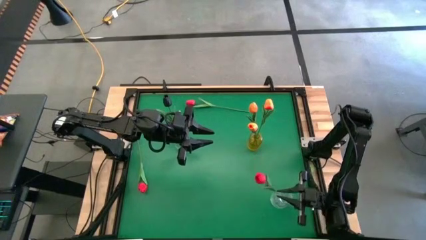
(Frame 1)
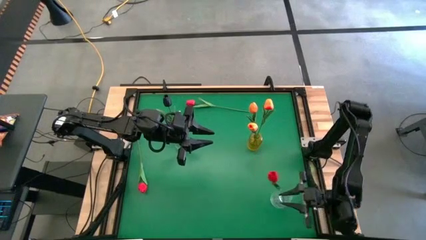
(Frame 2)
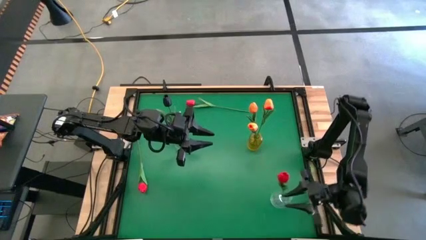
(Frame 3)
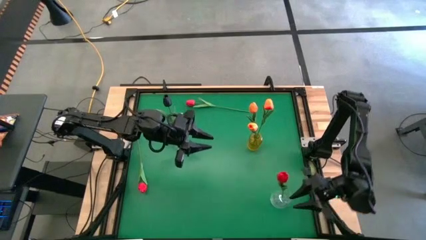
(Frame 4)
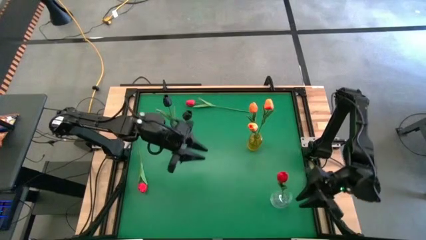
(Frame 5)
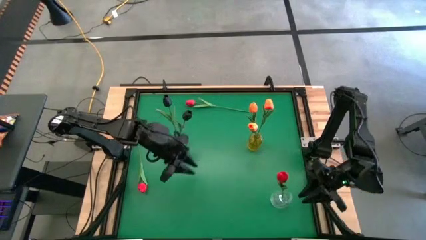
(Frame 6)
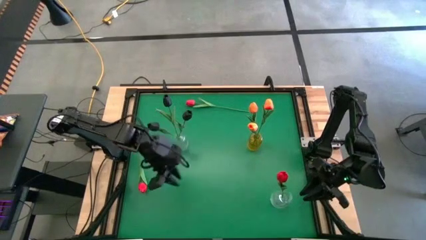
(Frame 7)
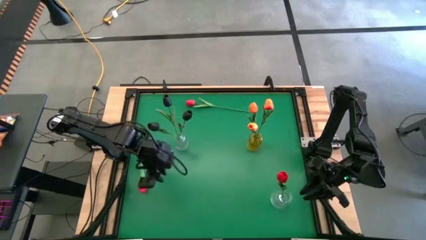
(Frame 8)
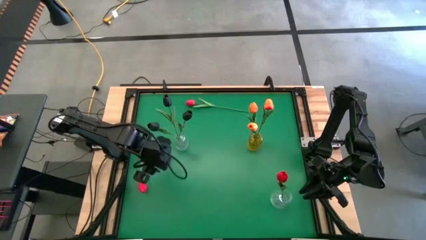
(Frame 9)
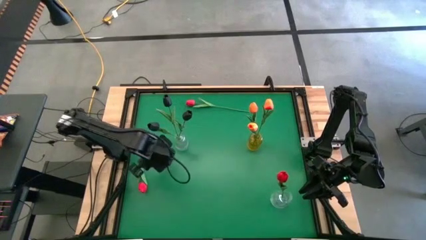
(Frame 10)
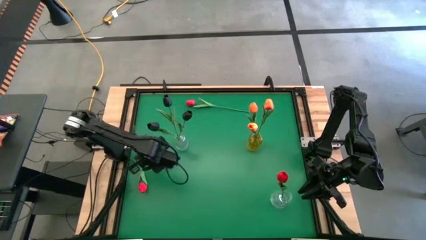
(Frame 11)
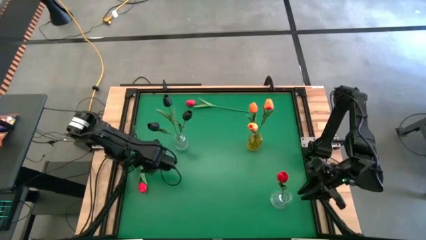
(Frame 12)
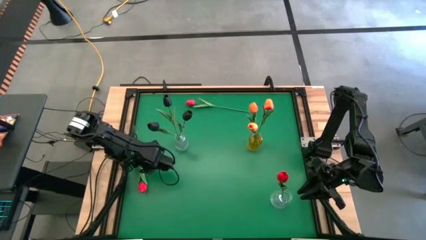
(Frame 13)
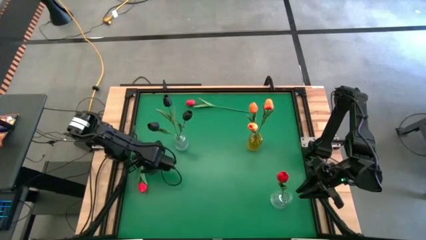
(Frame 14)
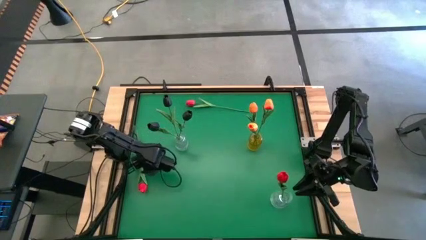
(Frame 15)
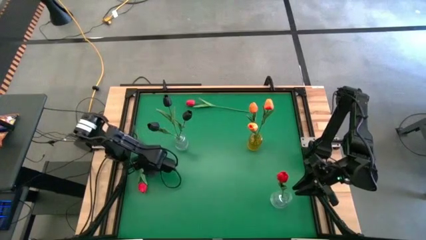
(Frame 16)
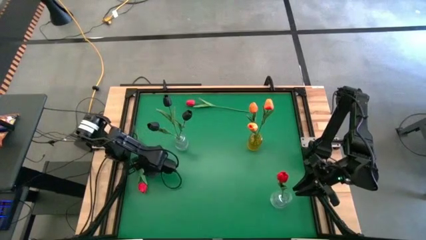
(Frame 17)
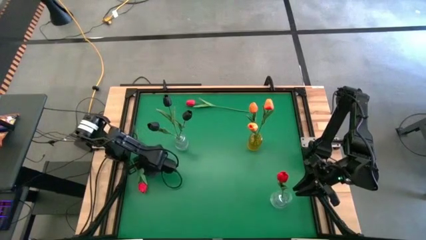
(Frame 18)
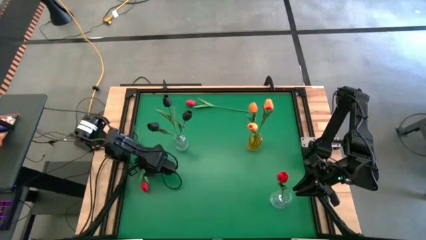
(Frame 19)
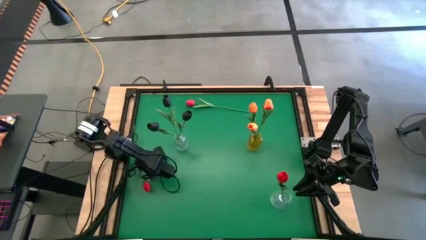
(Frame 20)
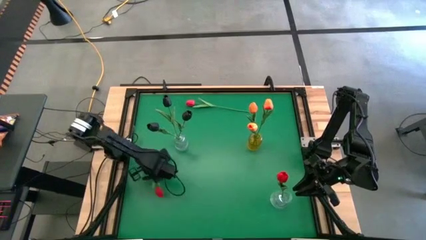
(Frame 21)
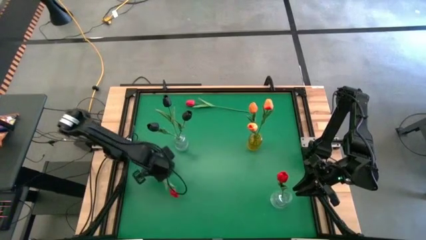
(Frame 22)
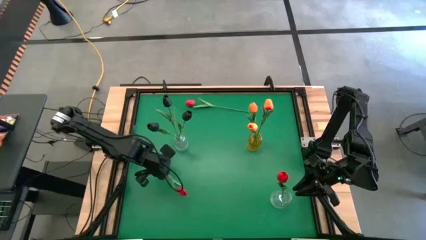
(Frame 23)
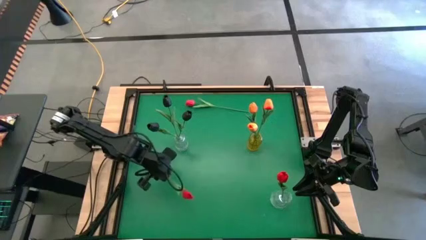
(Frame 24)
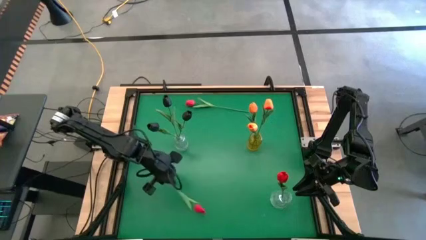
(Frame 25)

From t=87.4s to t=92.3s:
Task: Sort flowers into vase by color
Put the bottom red tulip into the bottom transparent vase

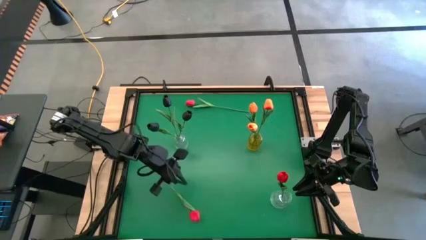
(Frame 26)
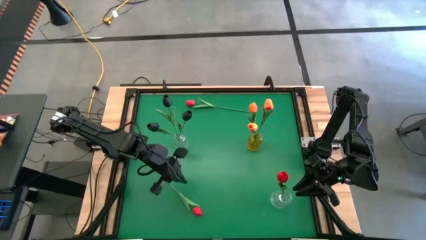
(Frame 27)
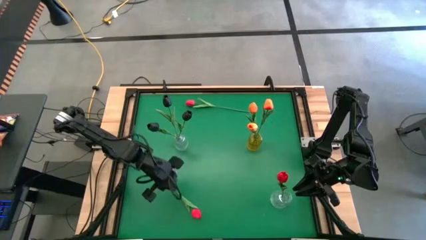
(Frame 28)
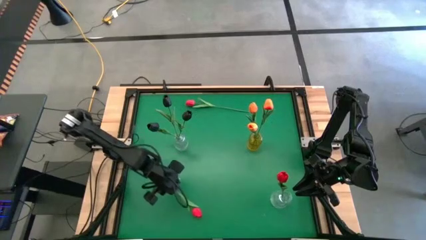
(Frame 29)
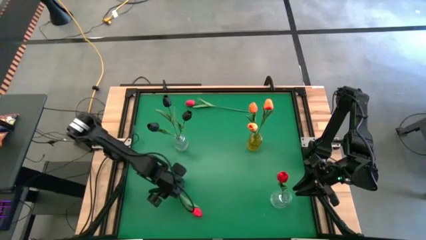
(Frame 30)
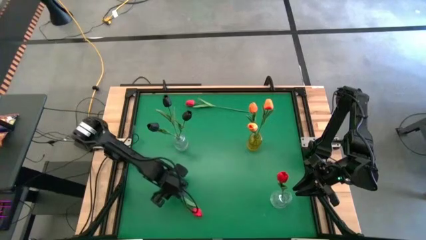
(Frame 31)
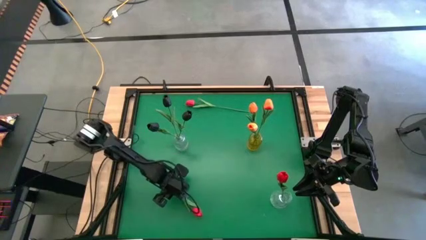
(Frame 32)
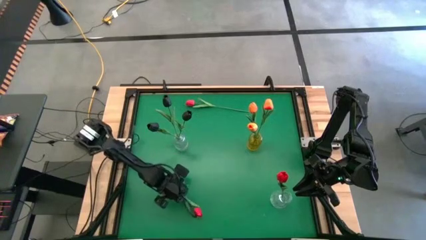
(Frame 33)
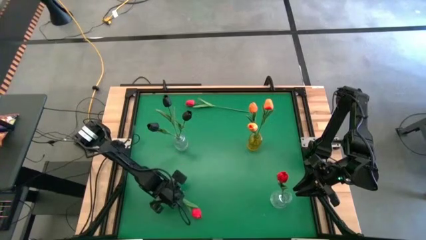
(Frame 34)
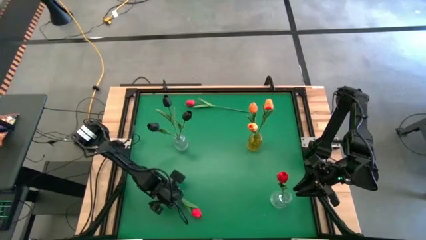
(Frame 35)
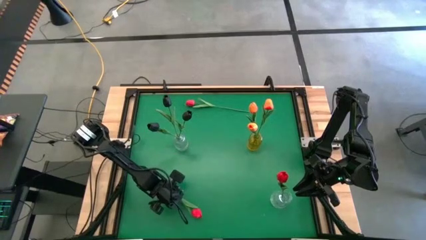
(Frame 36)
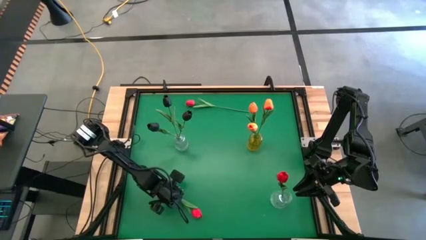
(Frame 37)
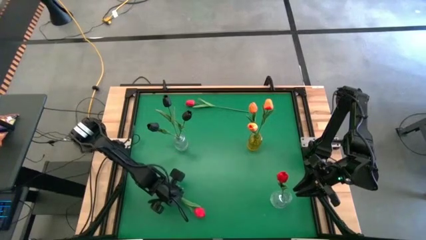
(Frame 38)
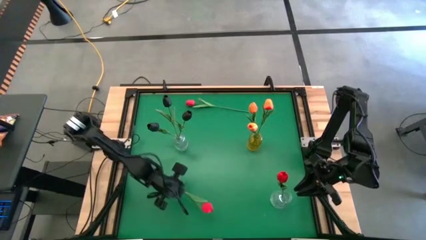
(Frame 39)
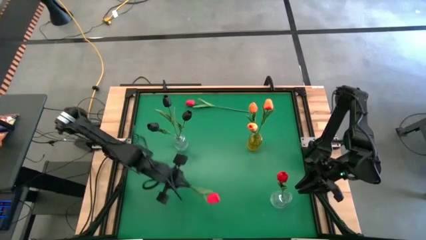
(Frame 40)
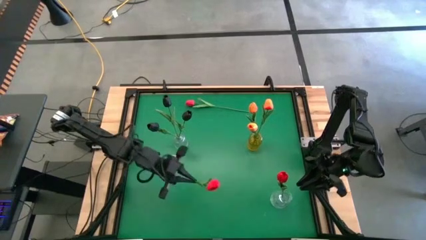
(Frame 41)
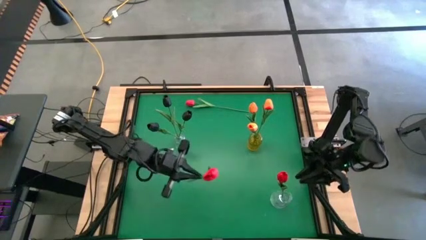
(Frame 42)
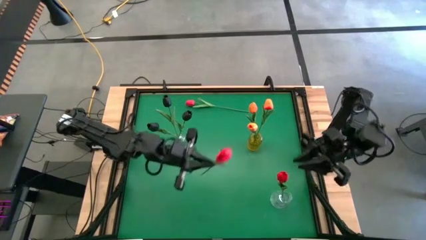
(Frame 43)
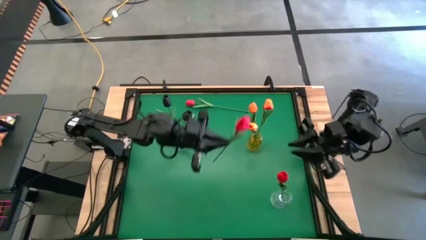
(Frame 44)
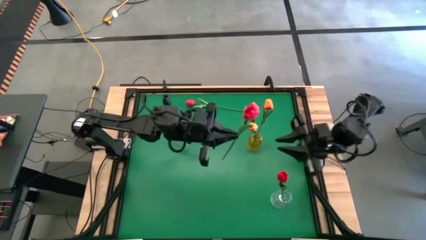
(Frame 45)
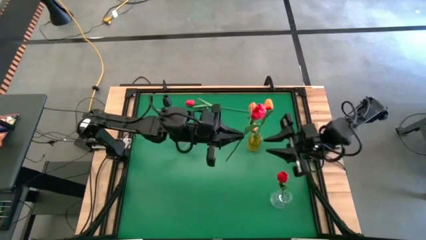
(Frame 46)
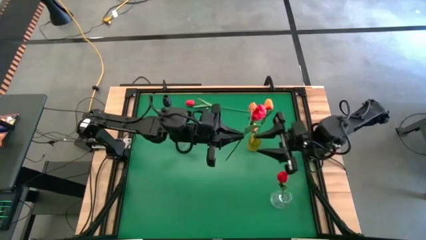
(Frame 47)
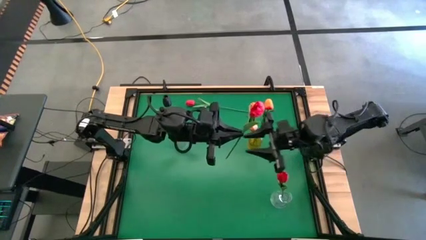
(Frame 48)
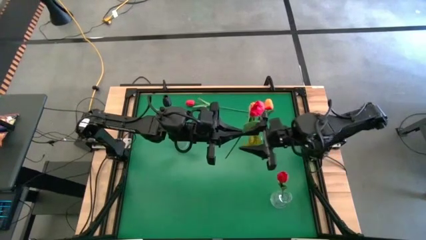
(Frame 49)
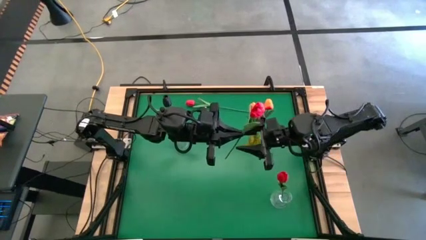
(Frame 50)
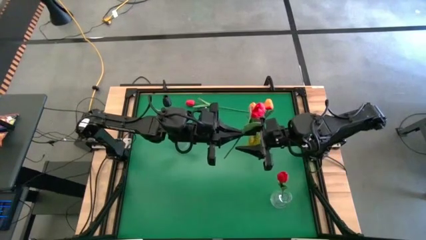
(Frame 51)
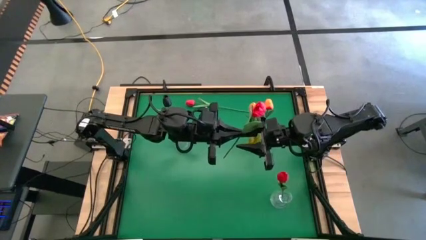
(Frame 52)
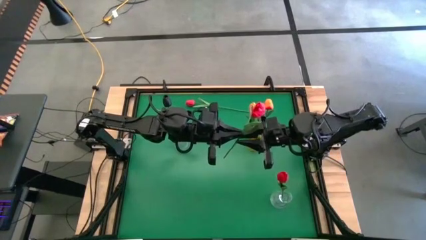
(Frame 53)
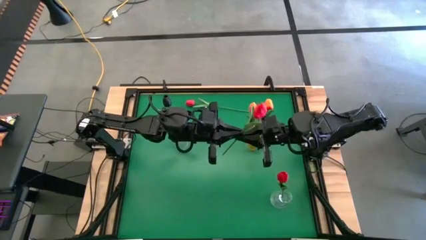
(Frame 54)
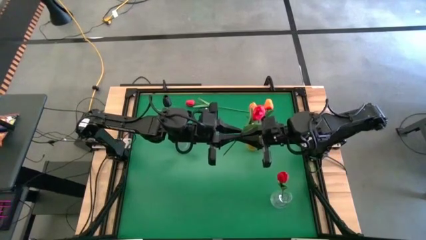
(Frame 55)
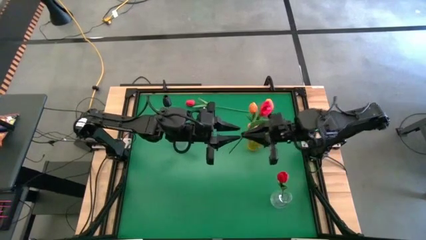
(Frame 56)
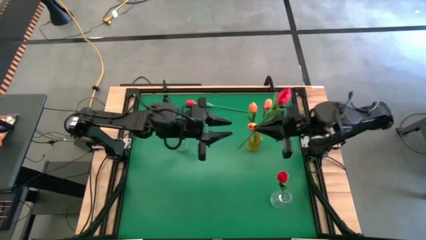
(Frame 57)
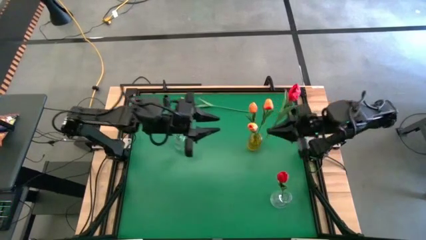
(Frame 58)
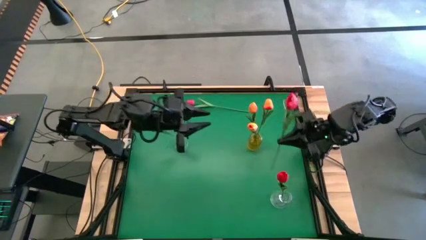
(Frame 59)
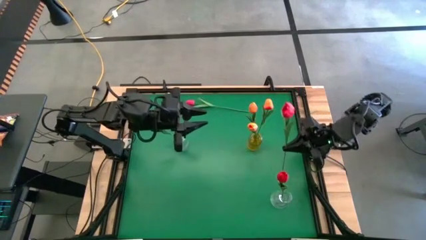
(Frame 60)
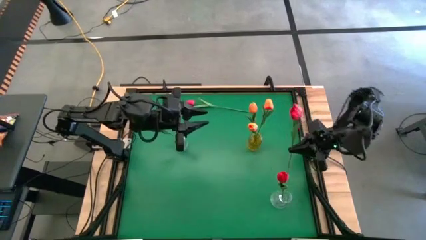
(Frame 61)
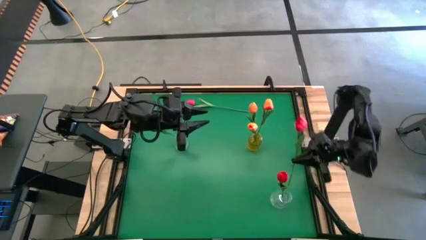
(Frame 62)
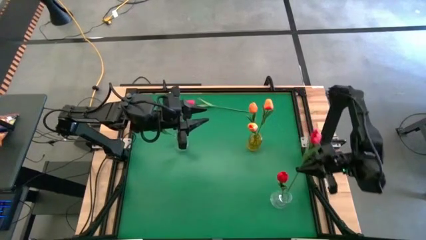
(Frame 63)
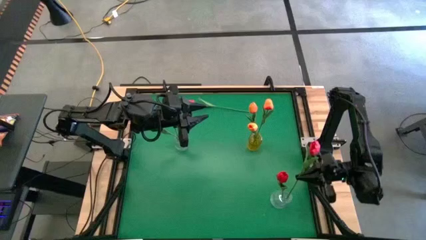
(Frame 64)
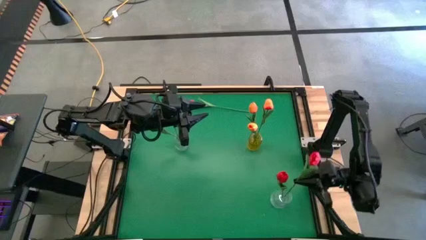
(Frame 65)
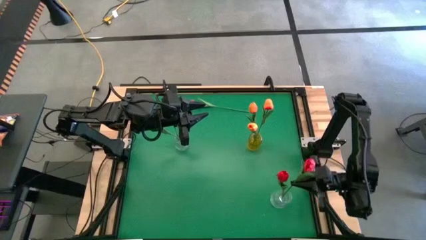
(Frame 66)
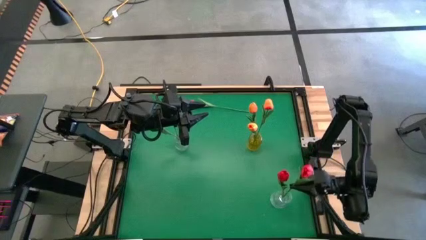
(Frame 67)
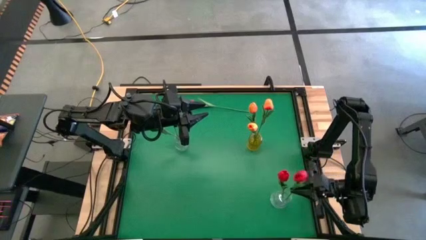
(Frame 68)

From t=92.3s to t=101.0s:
Put the bottom red tulip into the bottom transparent vase

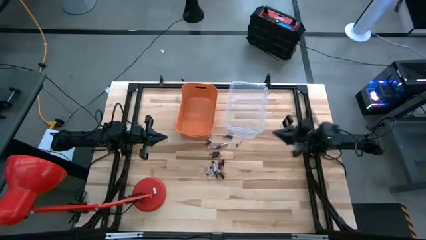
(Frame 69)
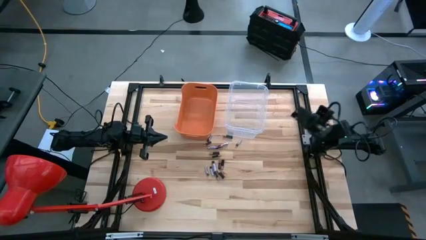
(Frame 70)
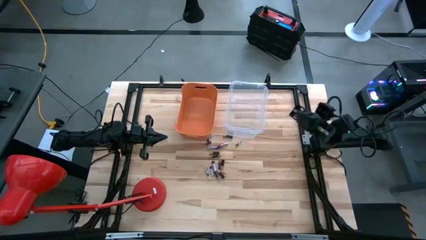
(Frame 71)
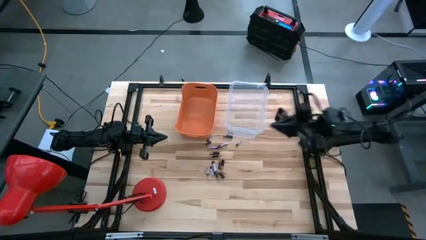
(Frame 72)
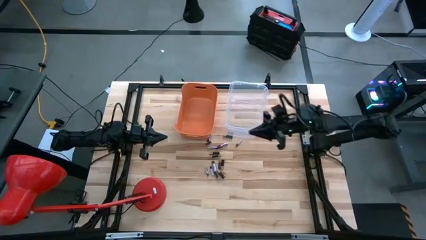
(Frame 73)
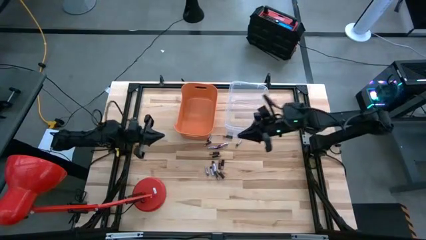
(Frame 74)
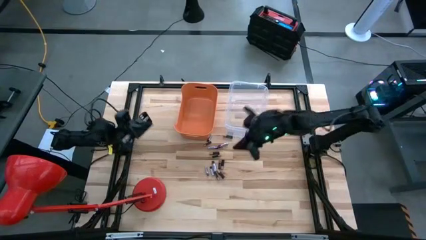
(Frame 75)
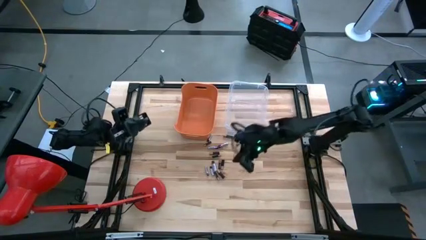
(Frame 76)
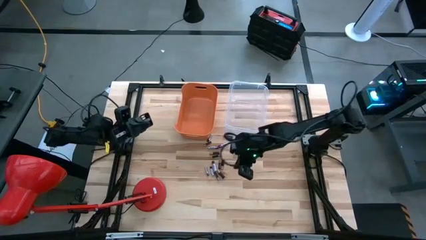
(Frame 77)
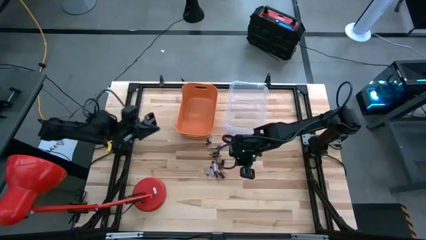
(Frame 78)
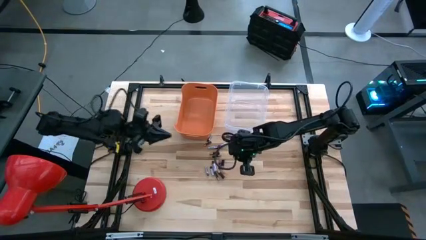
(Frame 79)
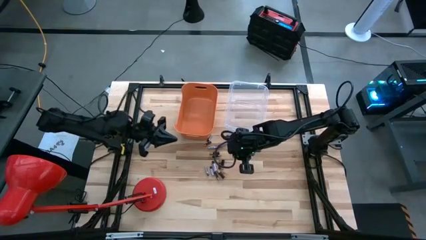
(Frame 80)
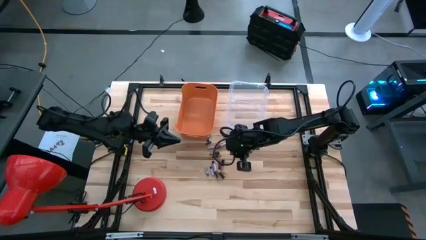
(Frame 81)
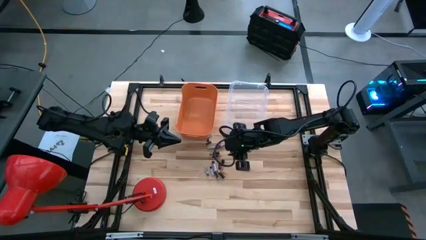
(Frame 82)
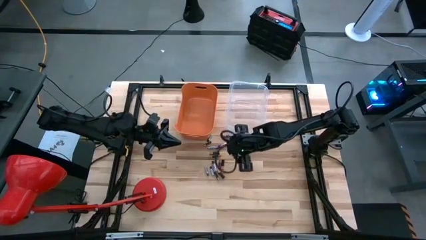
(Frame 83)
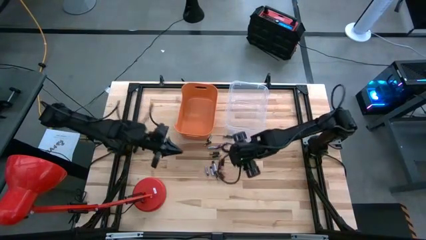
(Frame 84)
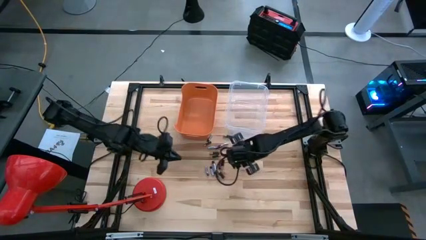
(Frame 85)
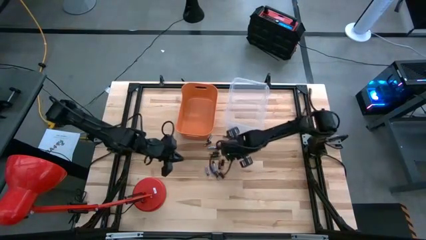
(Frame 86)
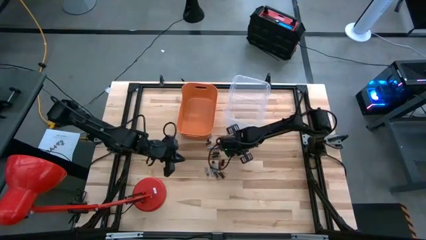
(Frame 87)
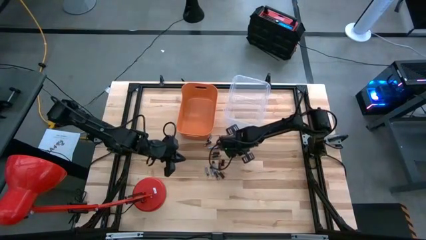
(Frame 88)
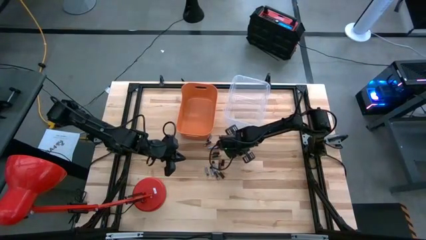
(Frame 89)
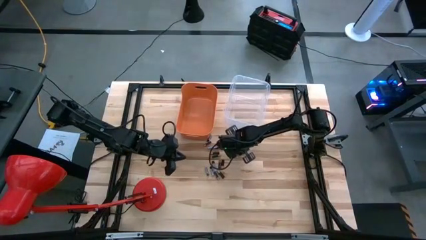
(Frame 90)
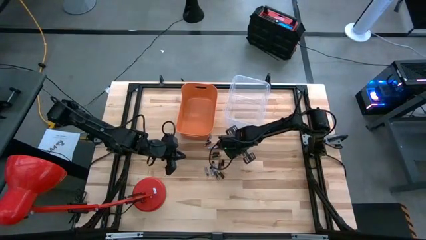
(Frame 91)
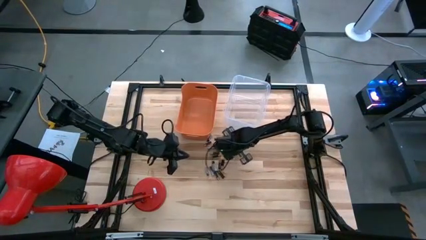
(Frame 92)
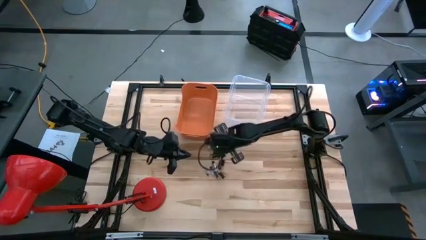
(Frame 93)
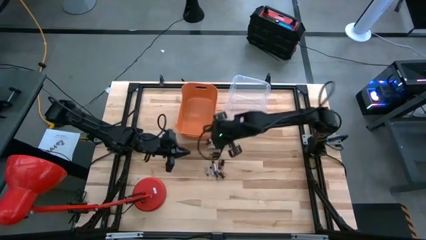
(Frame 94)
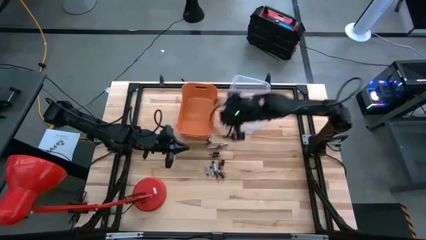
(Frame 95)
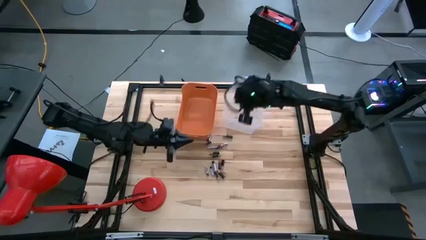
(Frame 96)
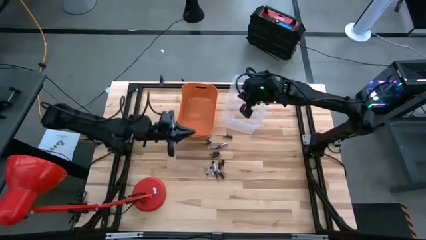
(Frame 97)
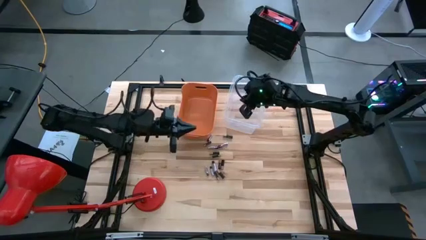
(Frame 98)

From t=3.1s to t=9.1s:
Task: Sort batteries
Put the silver battery into the transparent bin
